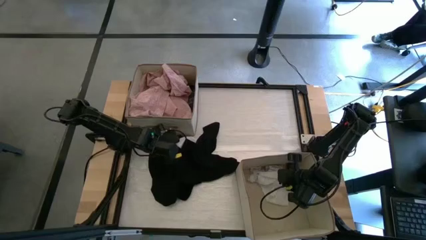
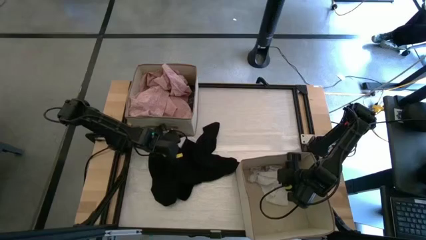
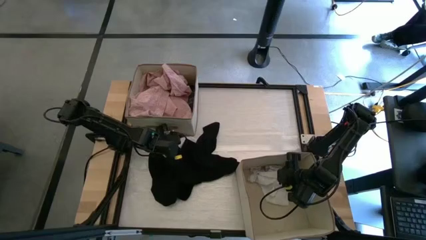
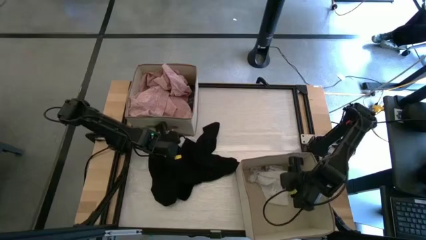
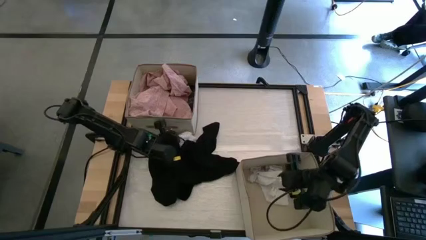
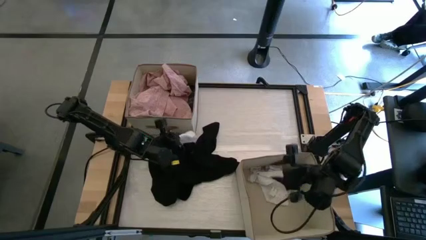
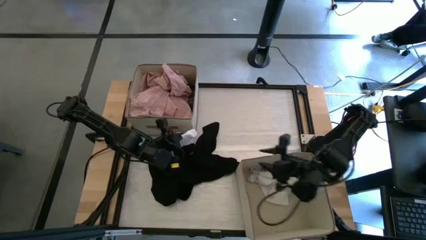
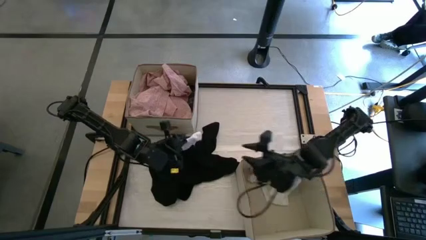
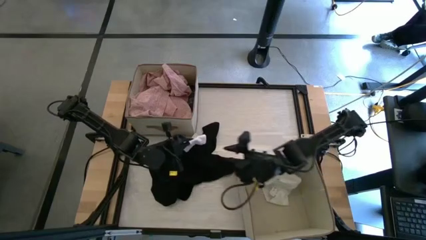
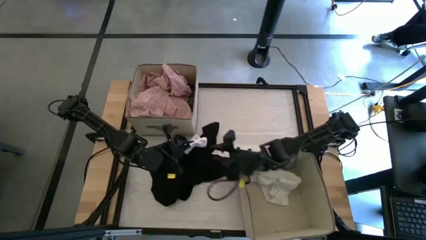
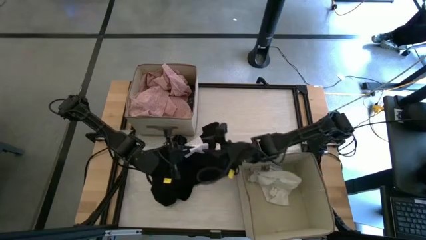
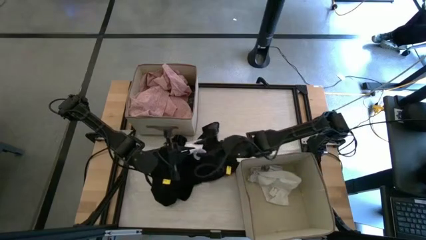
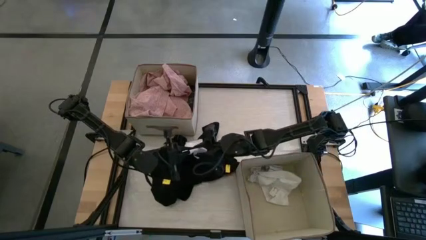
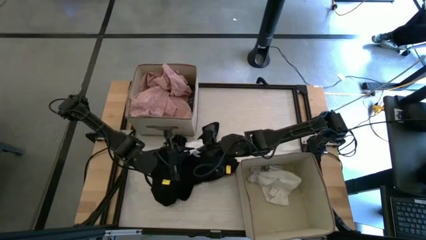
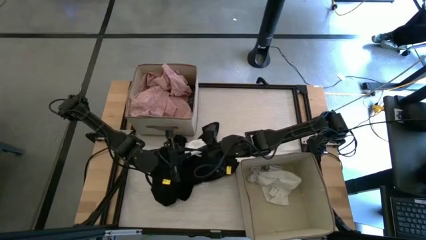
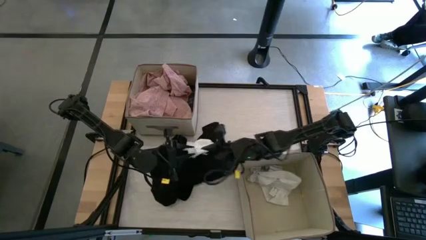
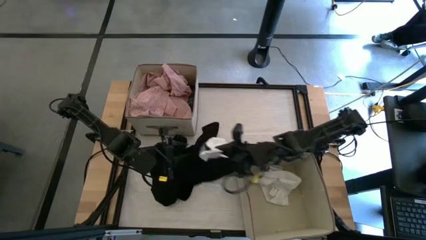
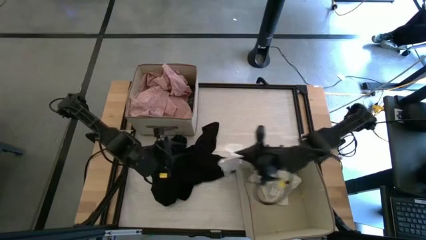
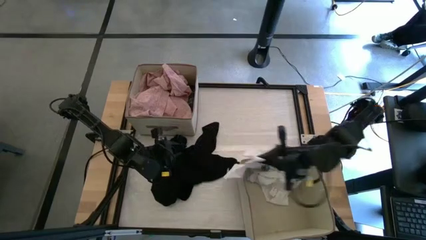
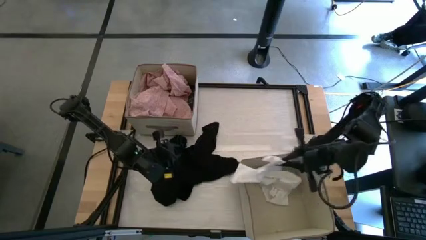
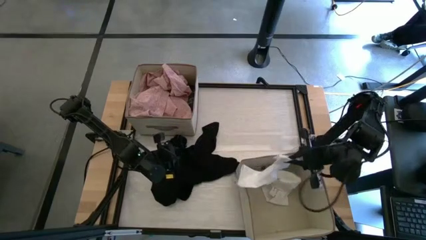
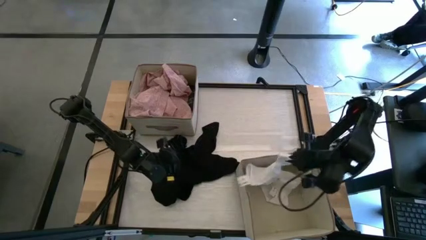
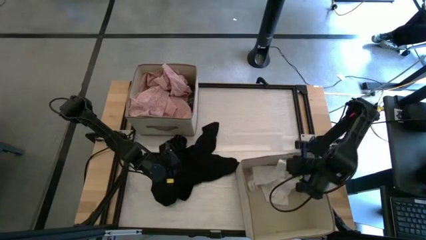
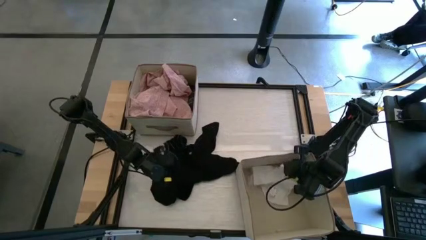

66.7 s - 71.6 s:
Task: Sort clothes
Put the white sock into the bottom white laundry organizer

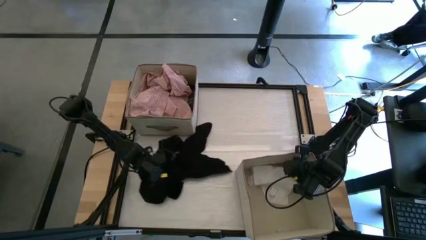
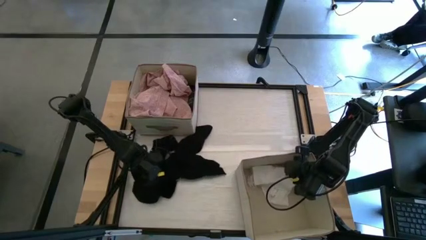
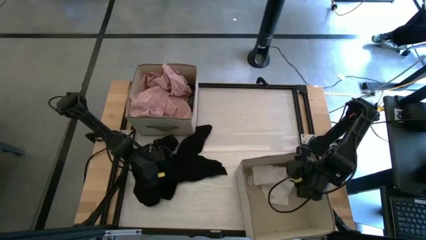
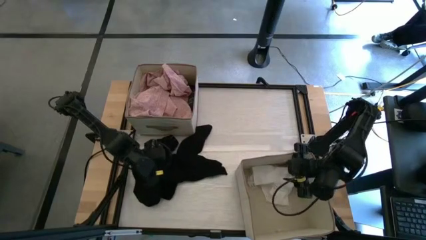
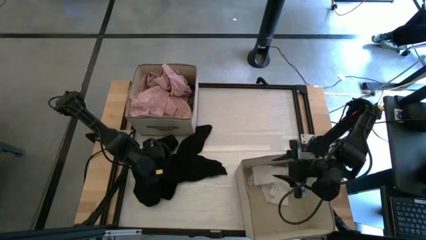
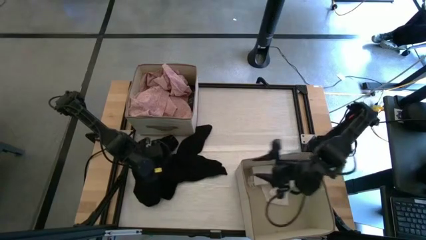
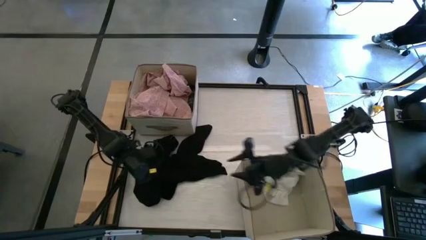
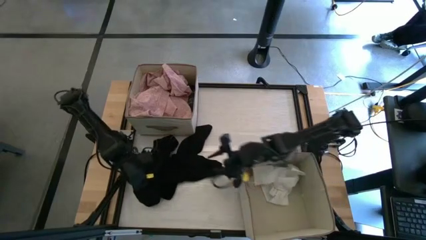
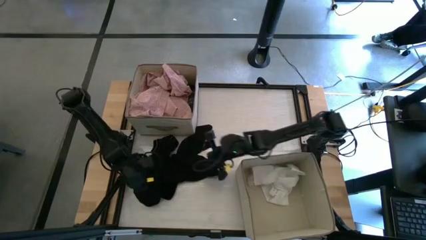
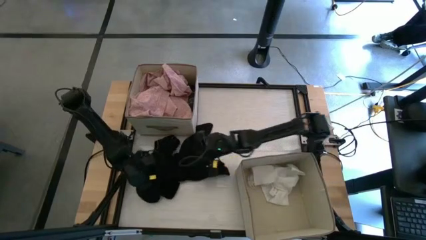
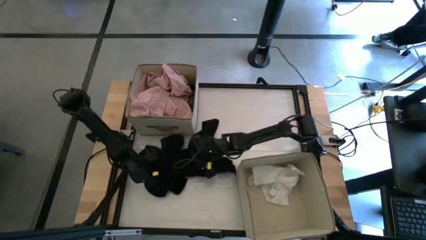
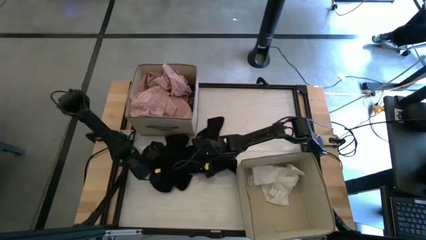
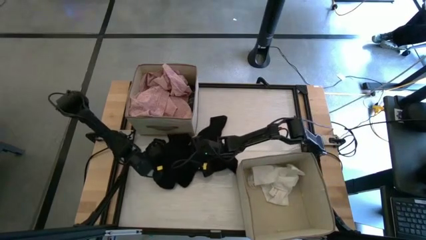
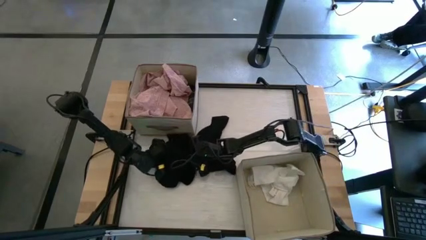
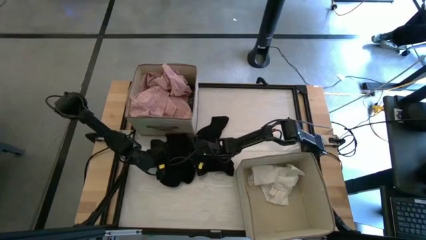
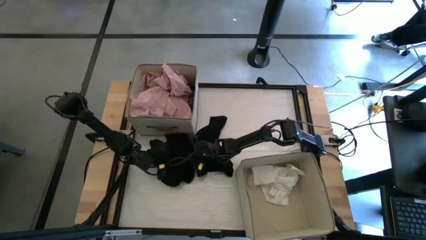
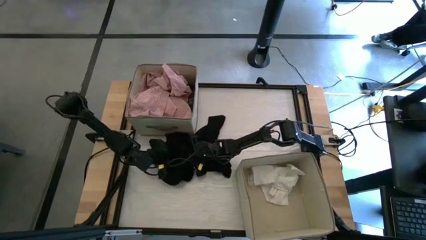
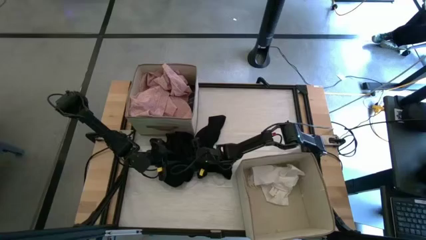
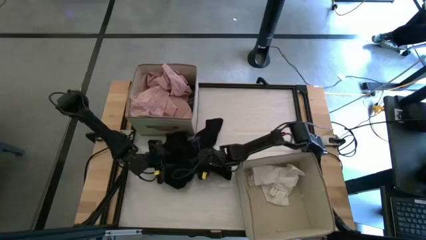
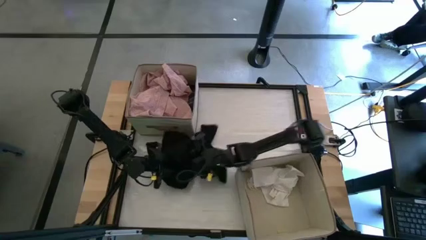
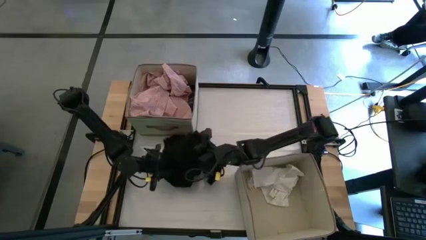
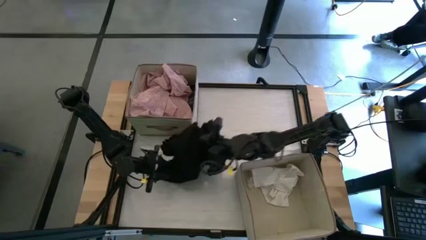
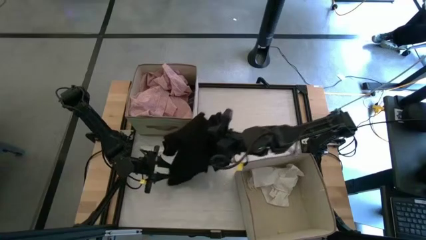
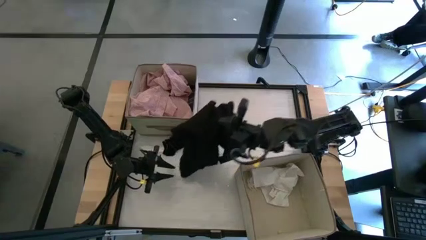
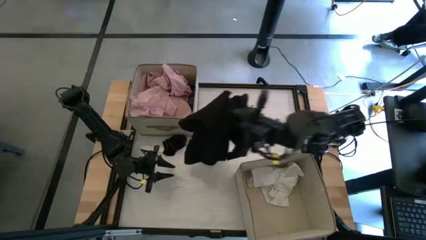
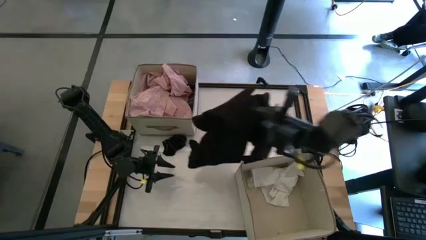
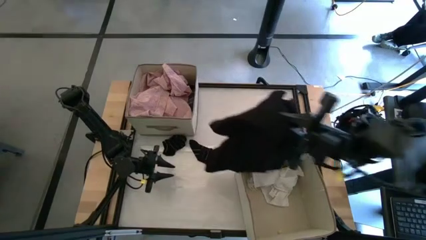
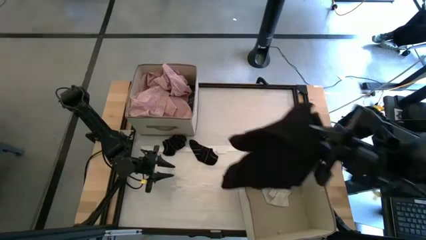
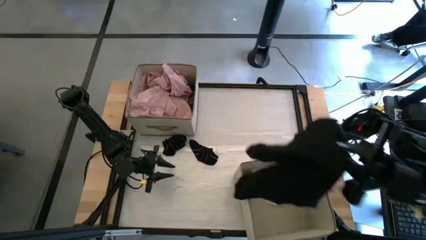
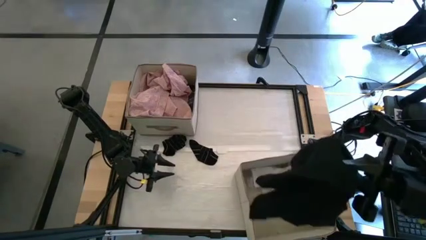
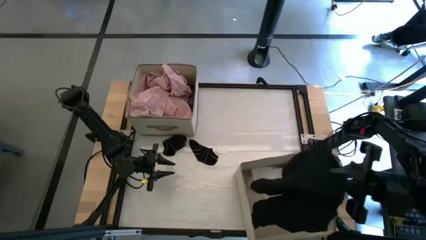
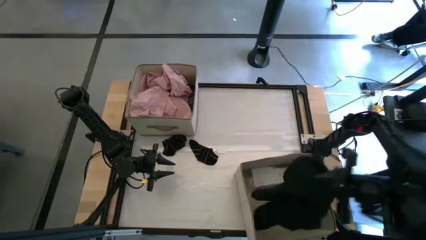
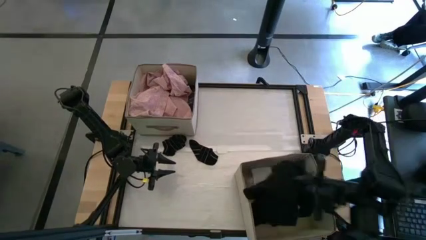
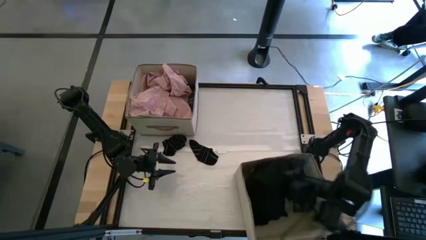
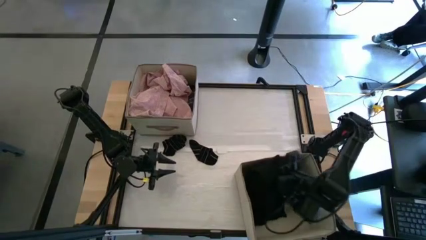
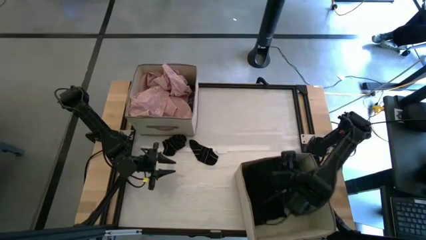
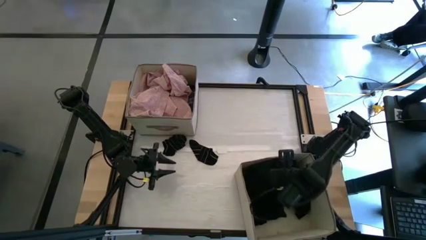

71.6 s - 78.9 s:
Put the black jacket into the bottom white laundry organizer

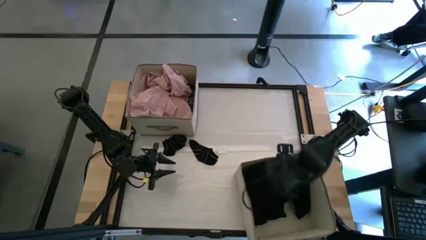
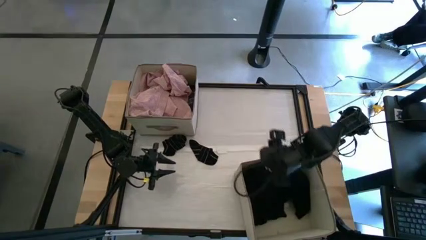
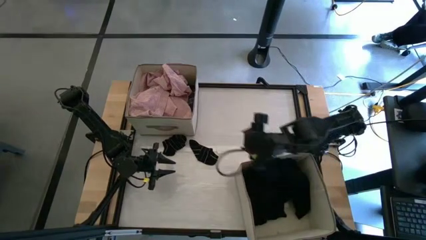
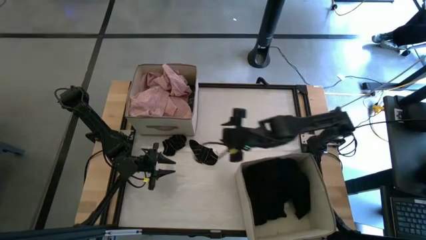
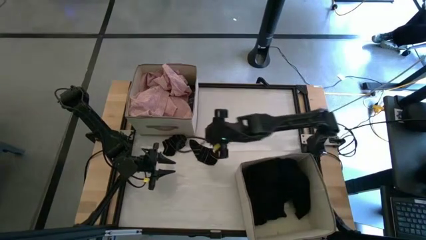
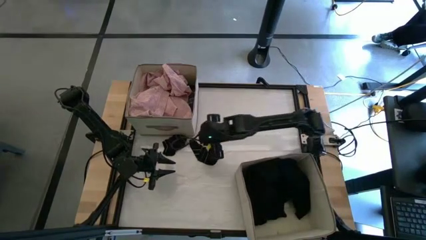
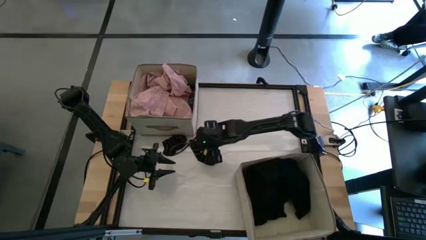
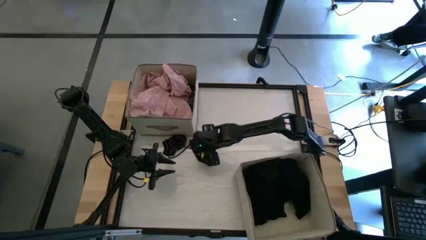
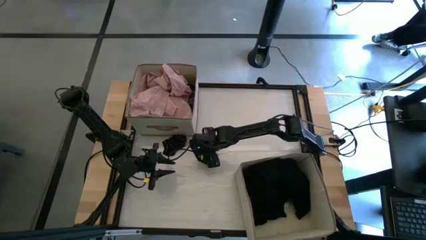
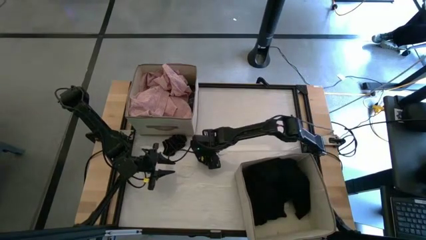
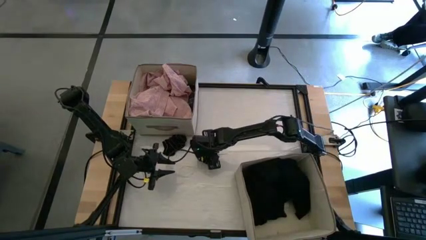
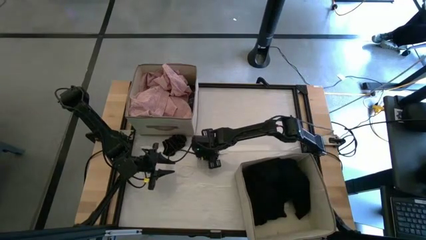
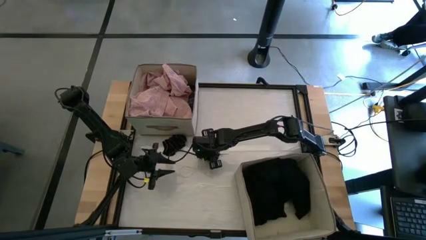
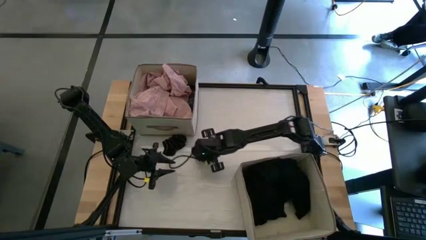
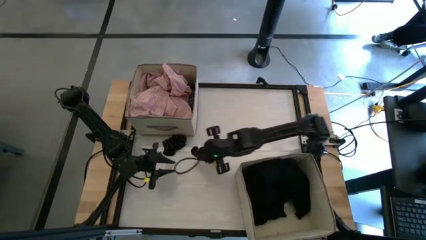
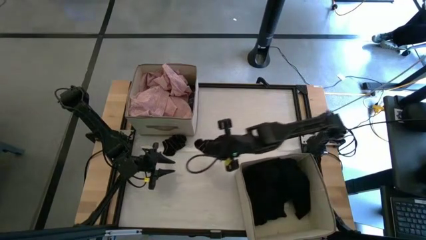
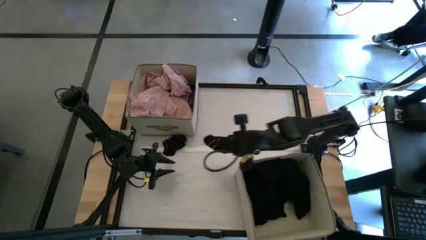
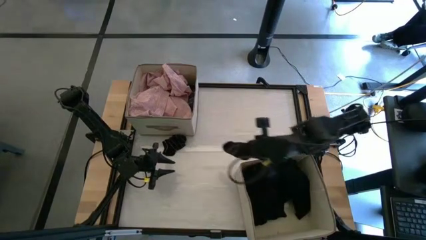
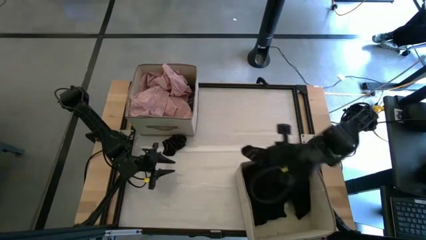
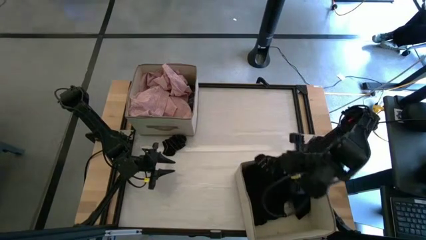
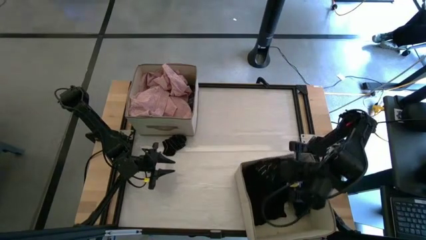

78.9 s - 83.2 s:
Put the black sock into the bottom white laundry organizer

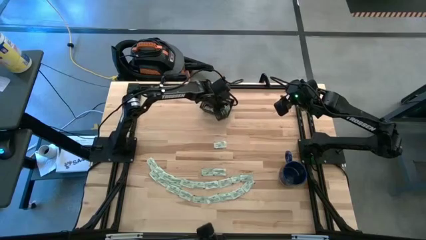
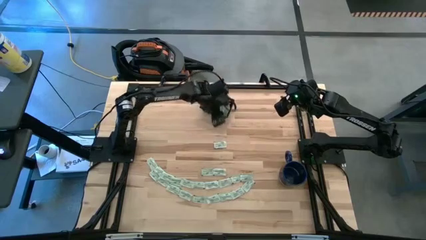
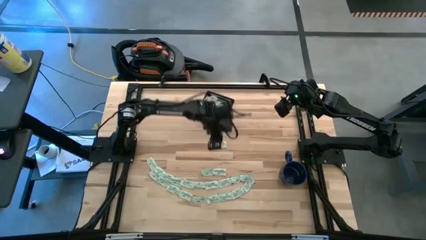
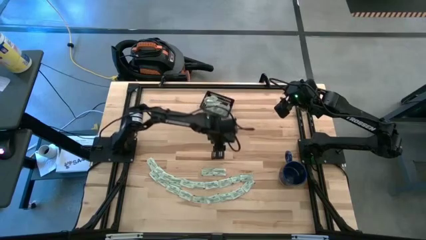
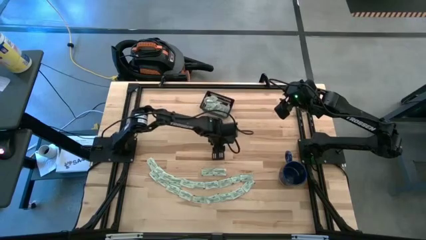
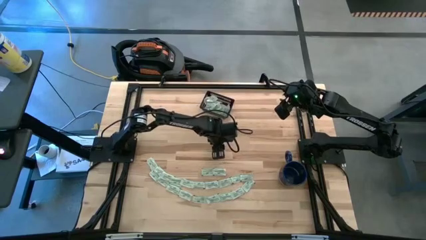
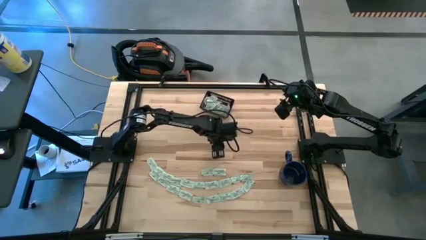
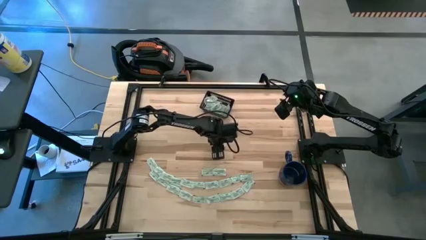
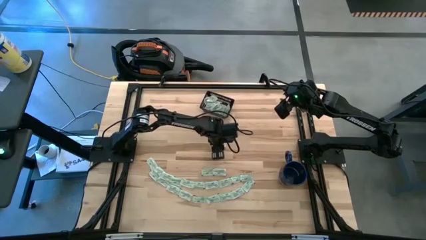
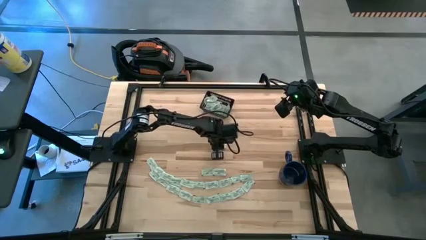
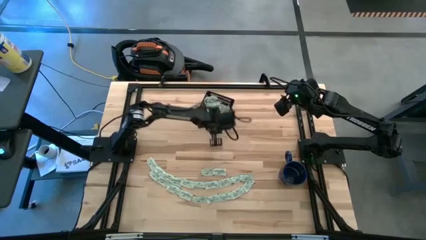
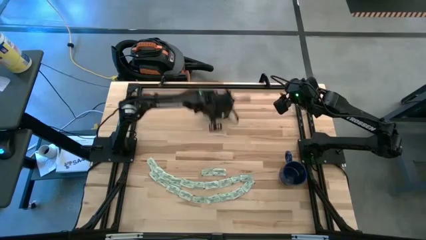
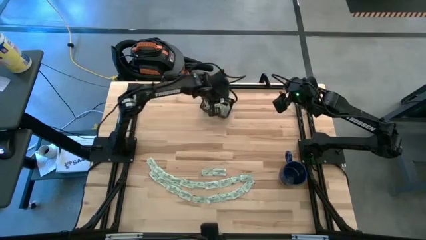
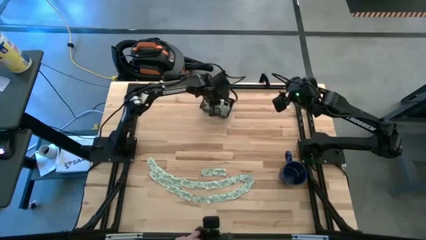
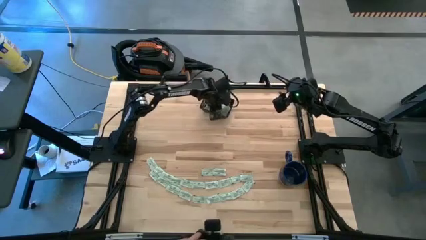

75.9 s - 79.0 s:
Task: Pick and place Stevia / Truvia into bins
Put the stevia packet into the black bin
